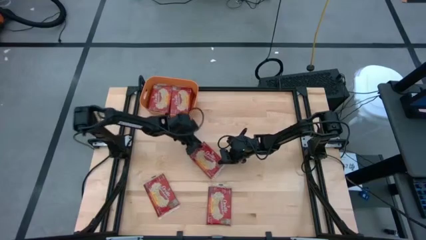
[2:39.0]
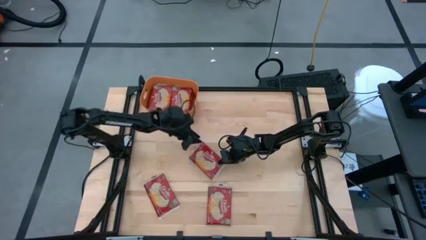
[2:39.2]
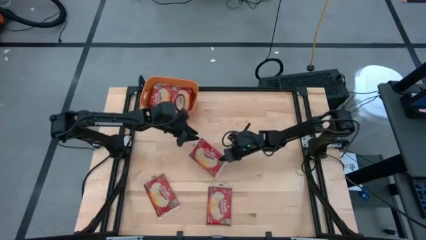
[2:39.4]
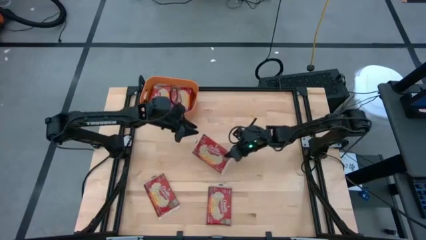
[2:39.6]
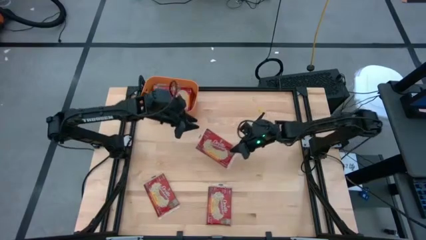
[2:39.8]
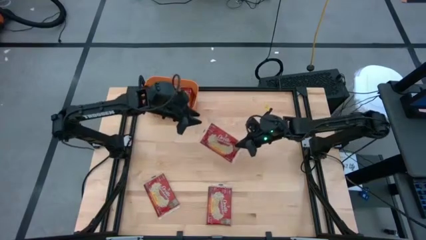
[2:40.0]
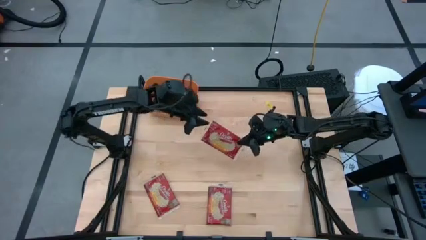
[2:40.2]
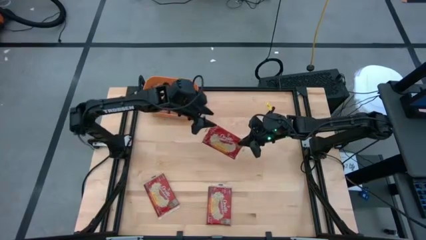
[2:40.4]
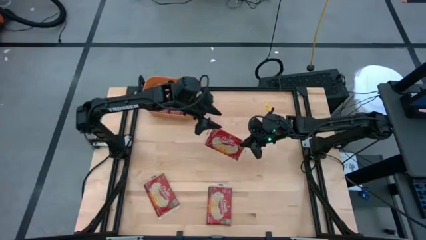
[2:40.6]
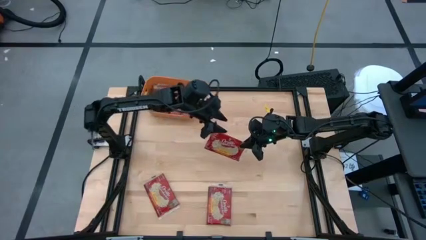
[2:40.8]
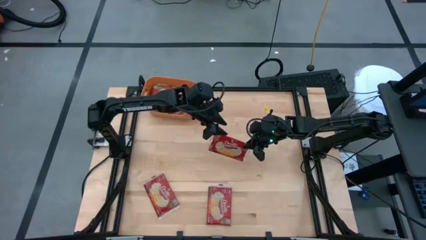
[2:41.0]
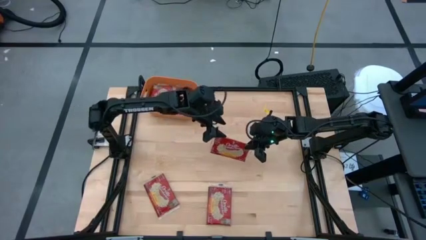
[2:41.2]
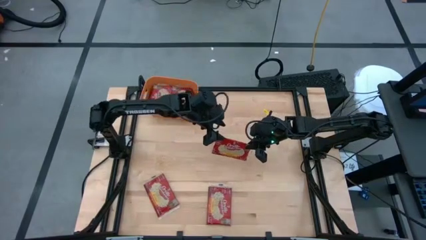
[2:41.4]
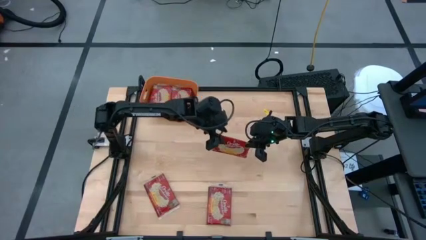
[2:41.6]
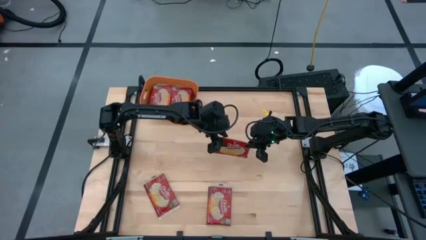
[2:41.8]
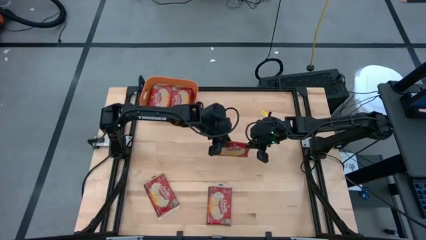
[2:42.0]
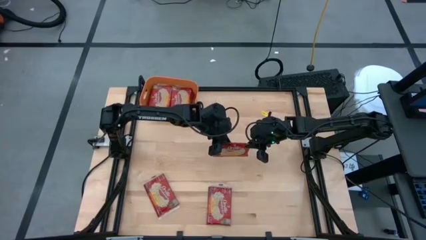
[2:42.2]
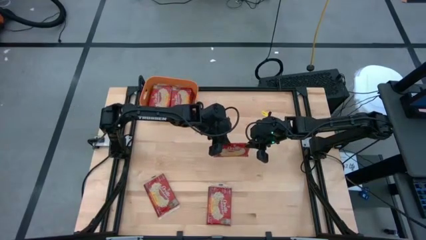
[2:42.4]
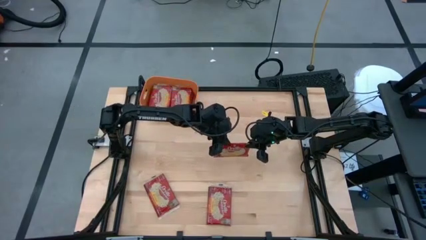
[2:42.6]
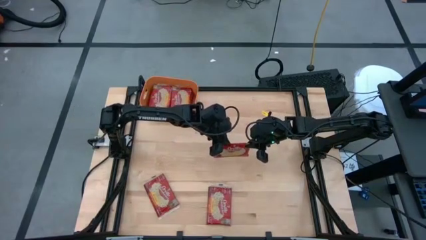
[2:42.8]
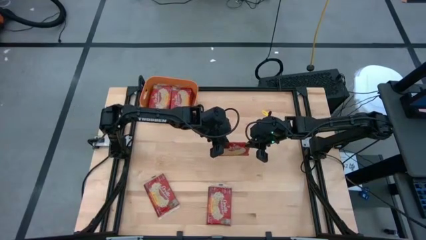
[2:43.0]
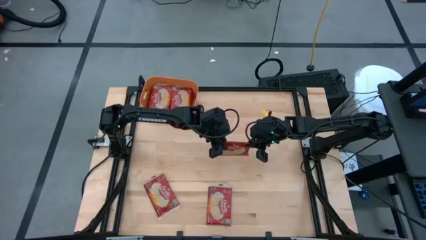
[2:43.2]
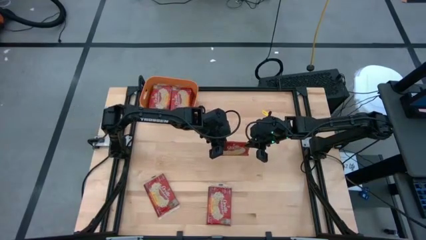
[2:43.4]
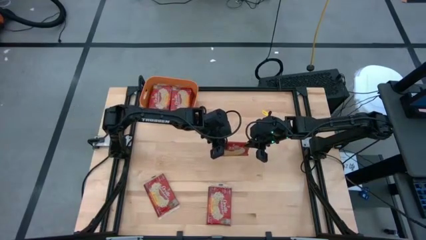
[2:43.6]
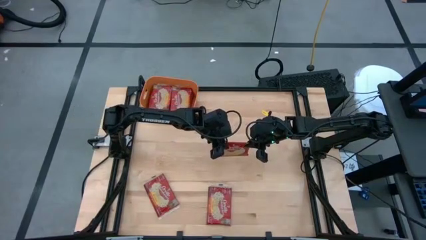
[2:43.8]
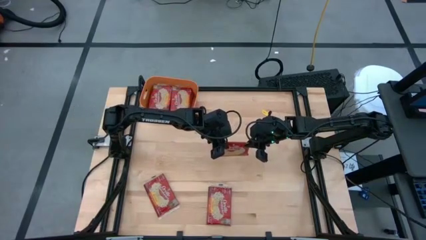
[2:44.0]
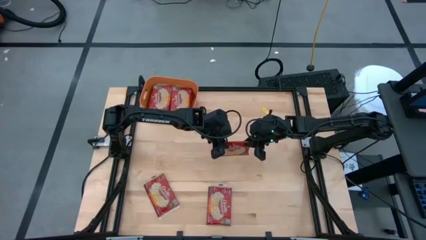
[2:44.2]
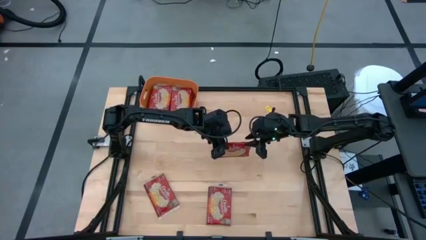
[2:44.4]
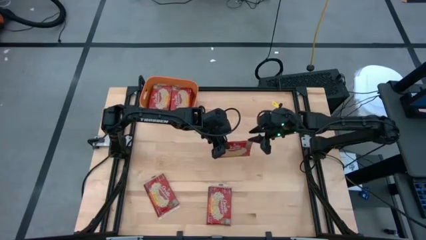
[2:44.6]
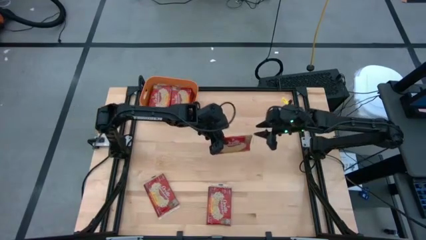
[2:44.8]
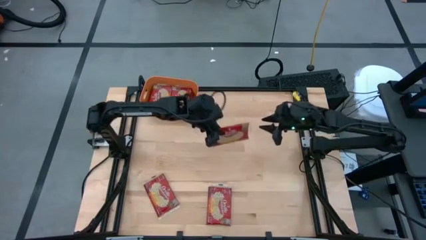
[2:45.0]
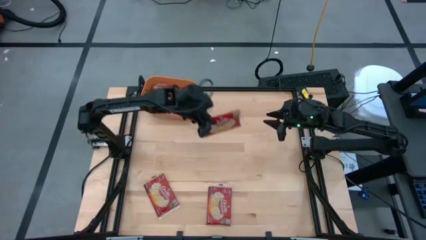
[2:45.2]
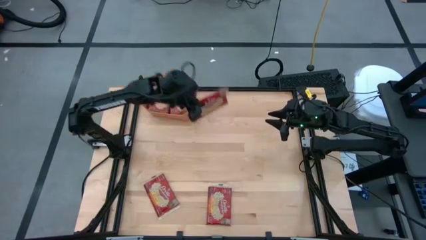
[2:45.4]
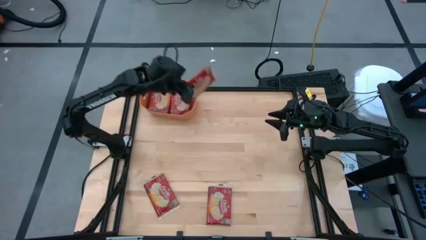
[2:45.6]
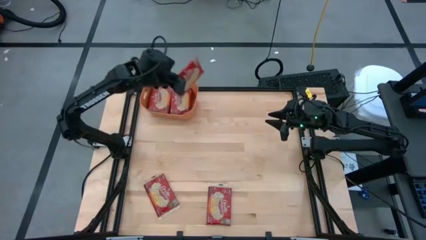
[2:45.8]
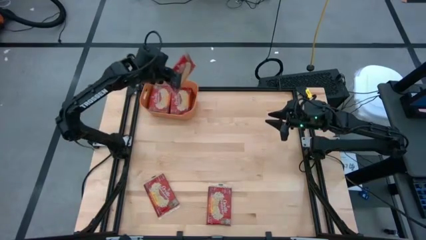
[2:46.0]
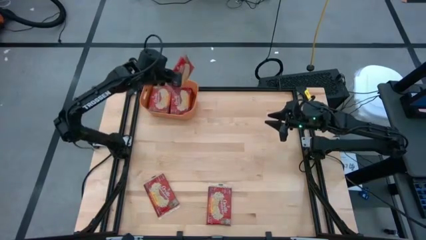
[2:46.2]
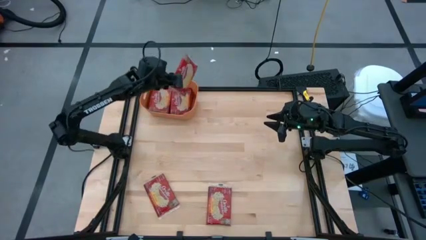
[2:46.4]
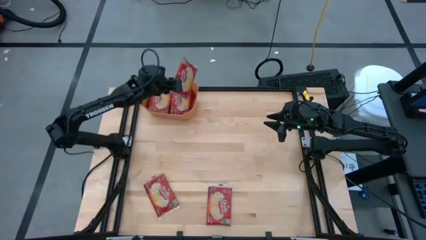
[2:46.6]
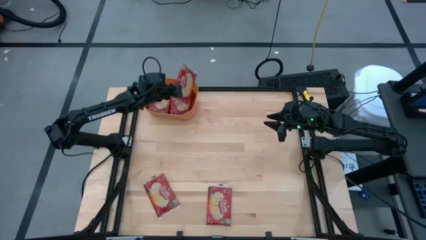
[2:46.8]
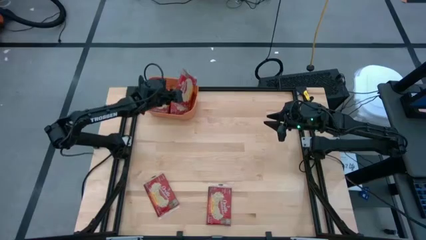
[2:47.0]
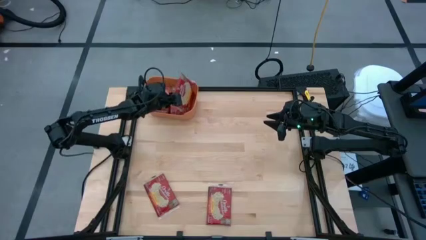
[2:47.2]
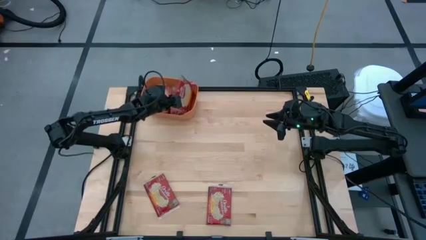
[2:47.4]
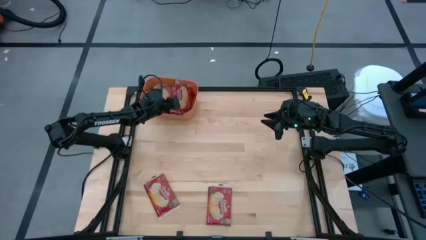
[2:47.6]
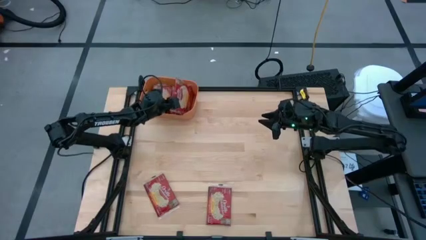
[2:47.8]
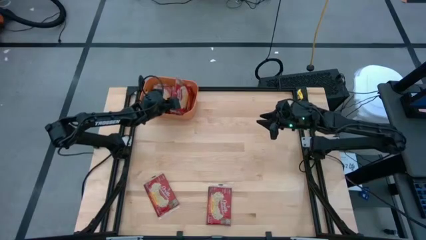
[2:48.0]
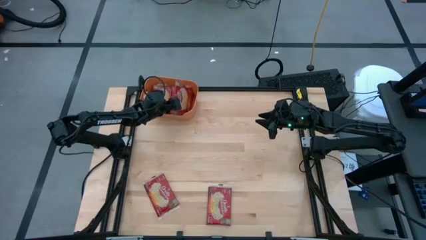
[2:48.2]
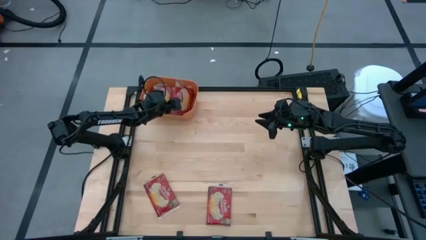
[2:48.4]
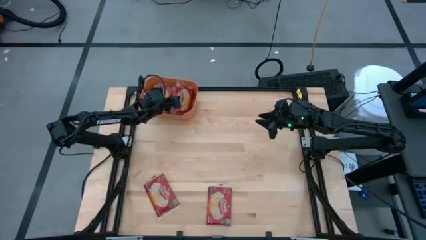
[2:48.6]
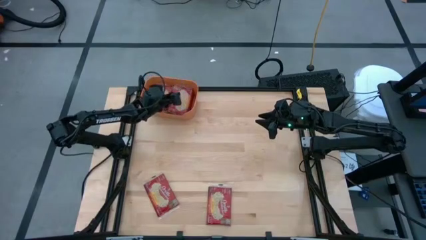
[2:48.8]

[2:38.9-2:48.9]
Task: Sort popcorn bags into baskets
Stack the red popcorn bag on top of the red popcorn bag in the orange bin
